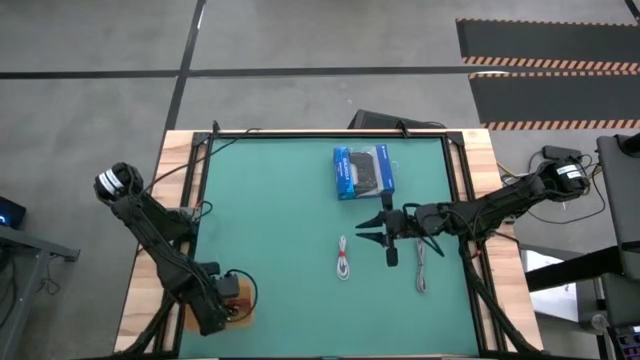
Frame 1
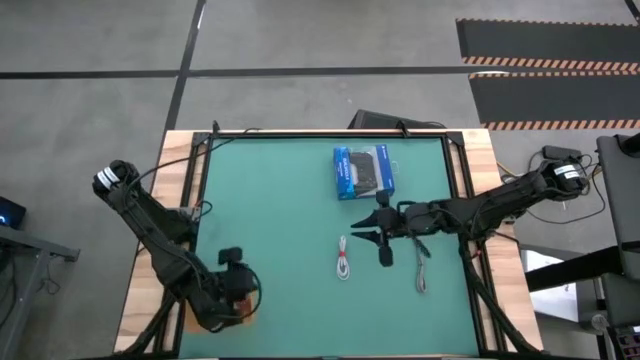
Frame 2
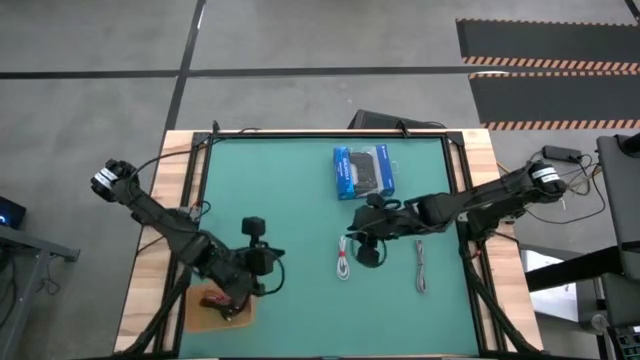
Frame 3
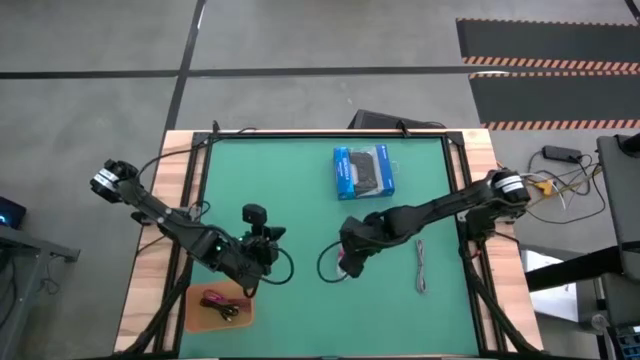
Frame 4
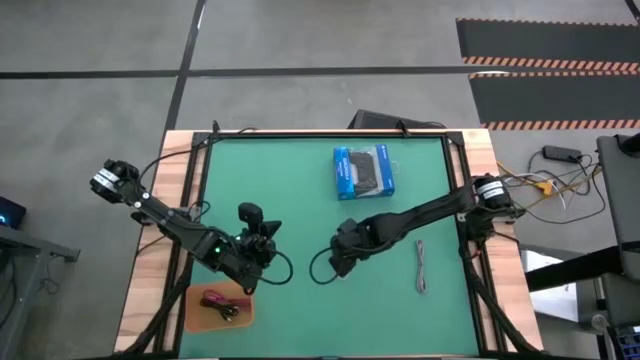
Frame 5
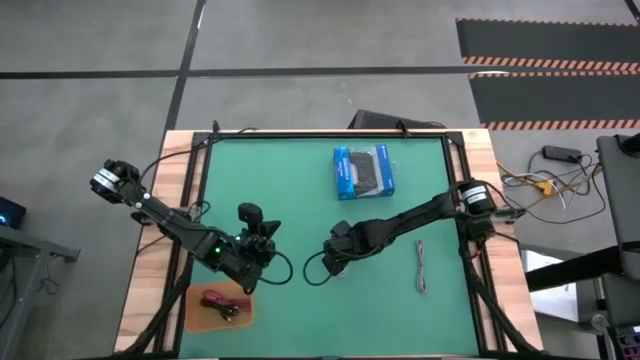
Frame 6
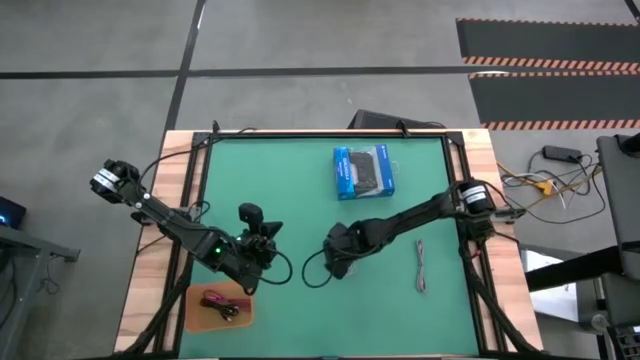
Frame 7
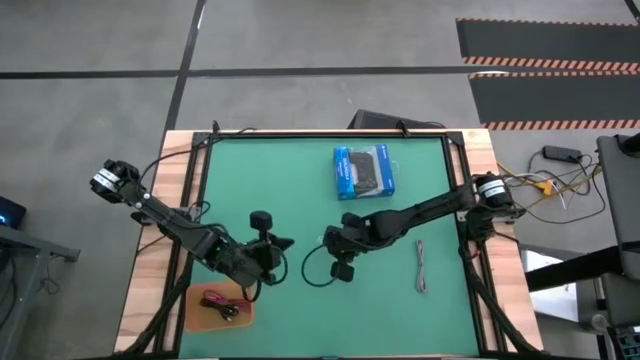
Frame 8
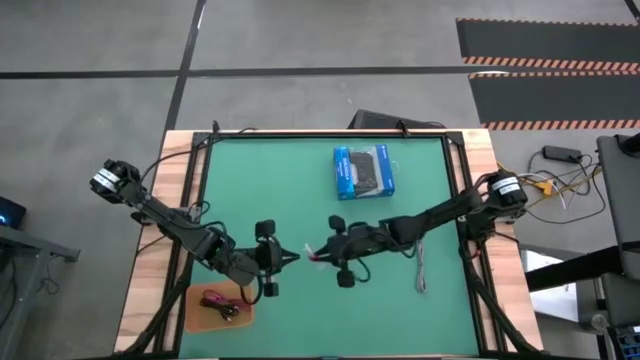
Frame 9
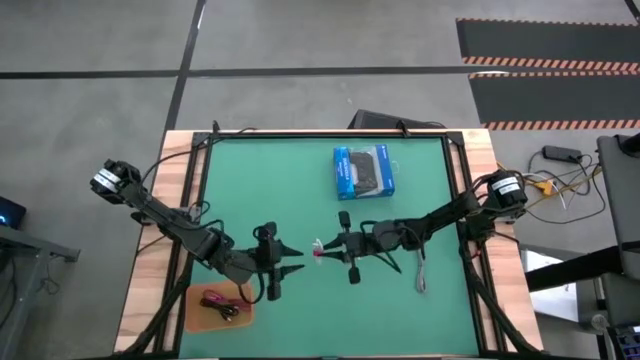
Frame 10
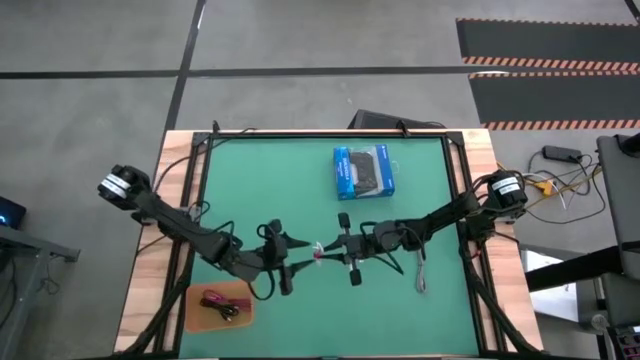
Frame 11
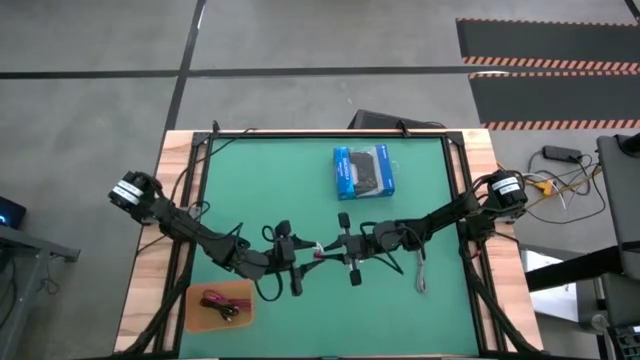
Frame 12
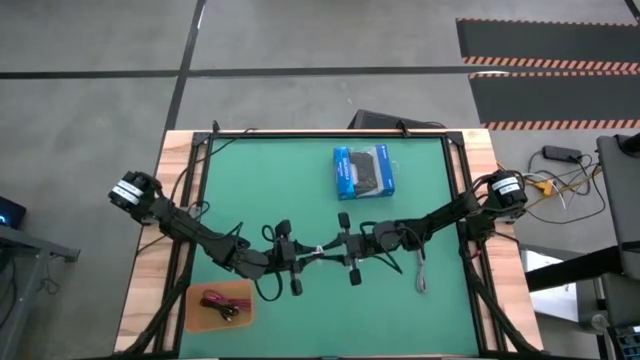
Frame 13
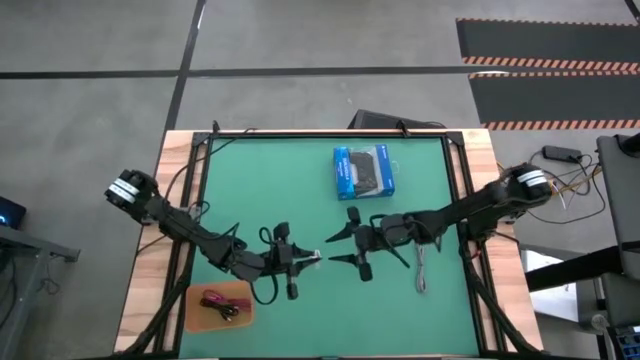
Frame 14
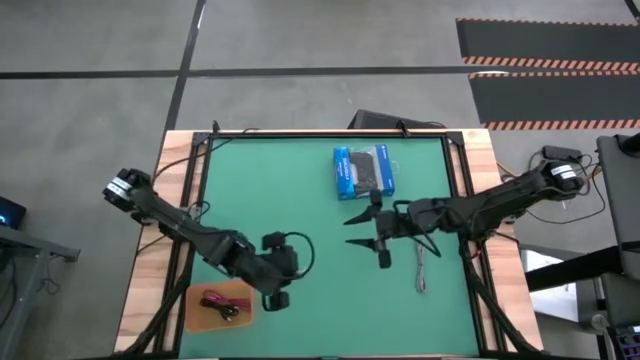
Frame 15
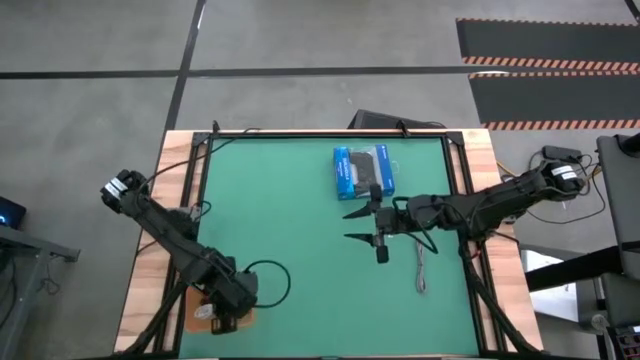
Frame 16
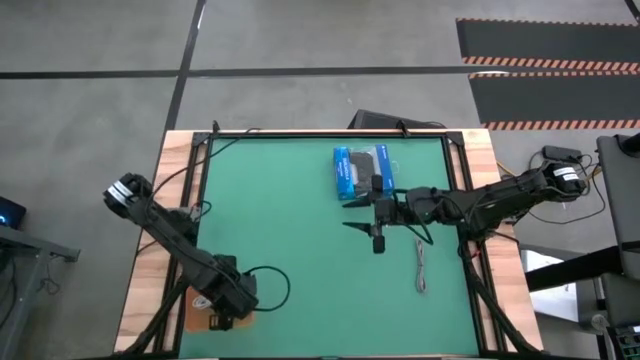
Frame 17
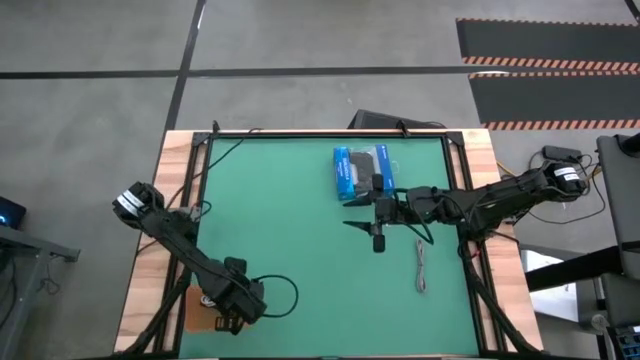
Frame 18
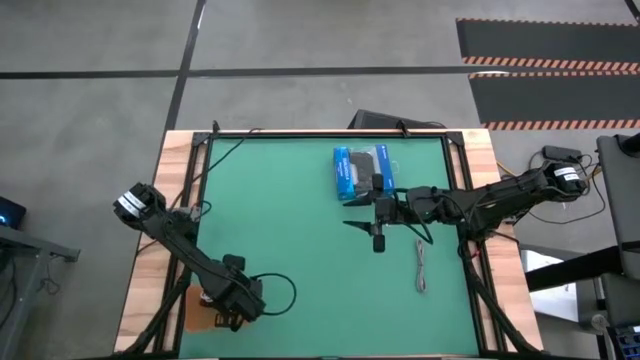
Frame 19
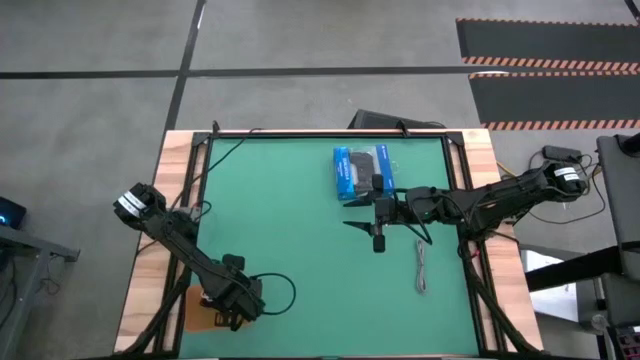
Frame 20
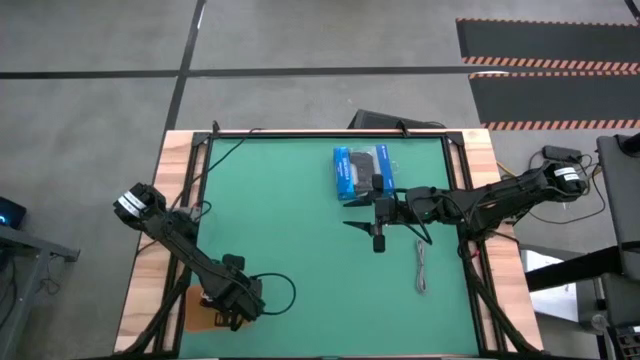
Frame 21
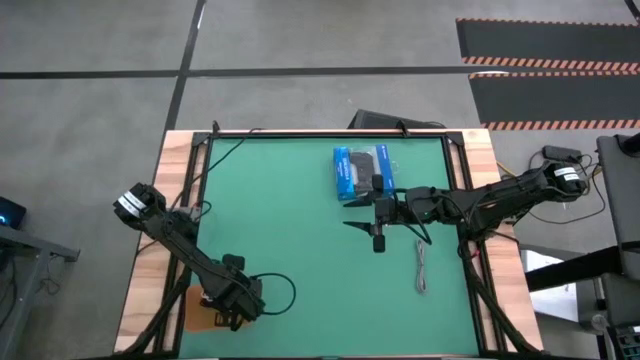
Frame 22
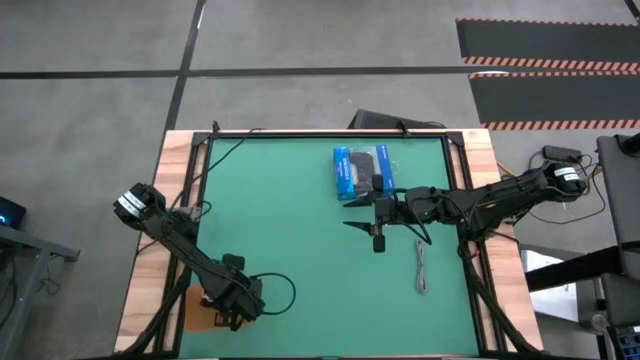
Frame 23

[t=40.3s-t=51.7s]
Task: Pick and place USB-C Cables
Put the white charger cable into the orange bin
